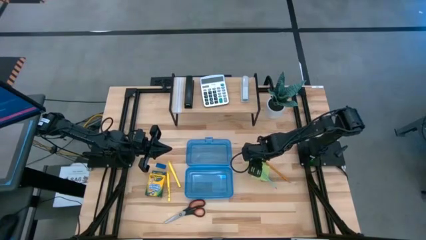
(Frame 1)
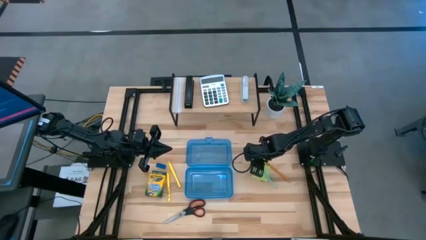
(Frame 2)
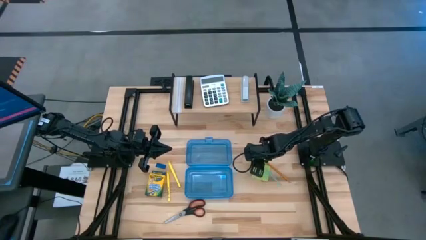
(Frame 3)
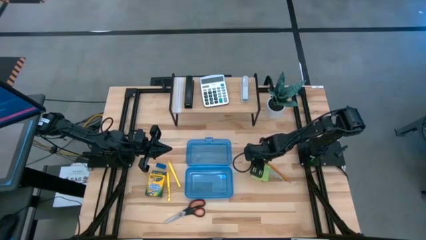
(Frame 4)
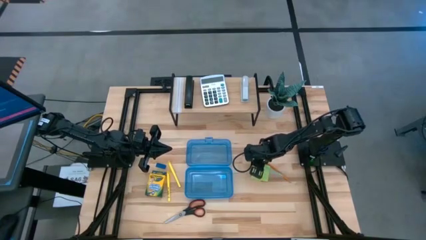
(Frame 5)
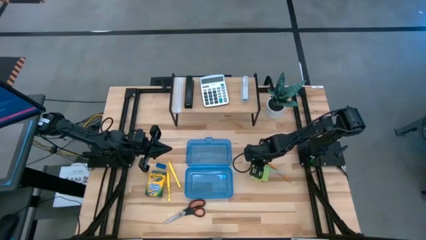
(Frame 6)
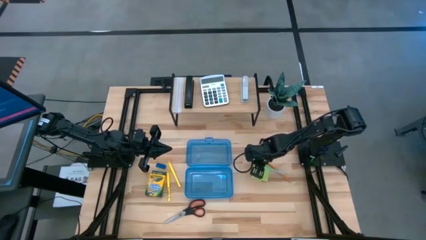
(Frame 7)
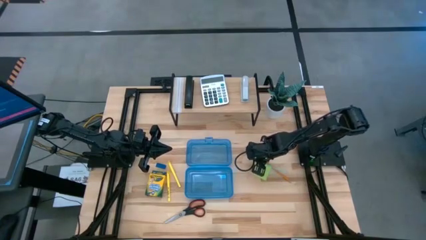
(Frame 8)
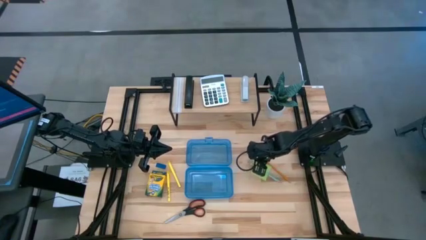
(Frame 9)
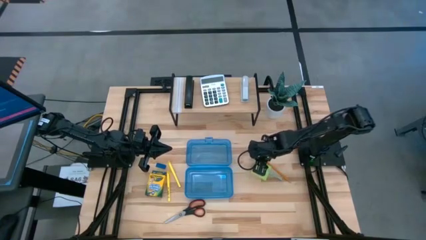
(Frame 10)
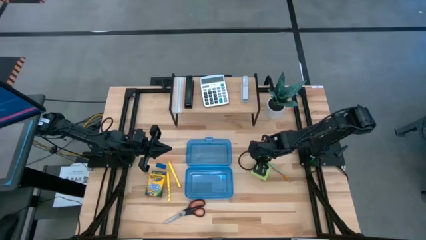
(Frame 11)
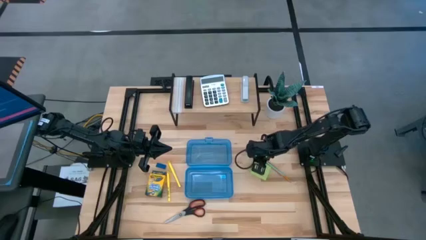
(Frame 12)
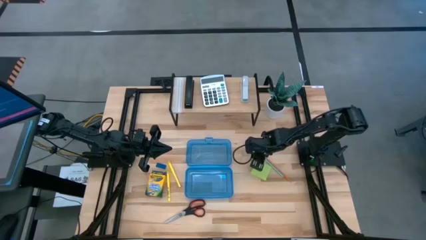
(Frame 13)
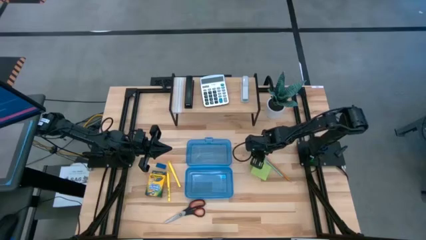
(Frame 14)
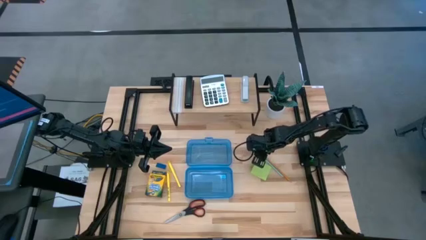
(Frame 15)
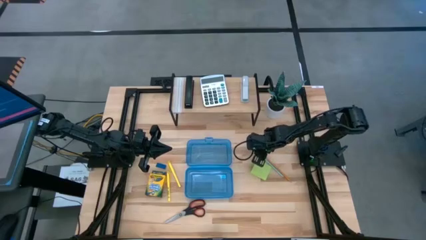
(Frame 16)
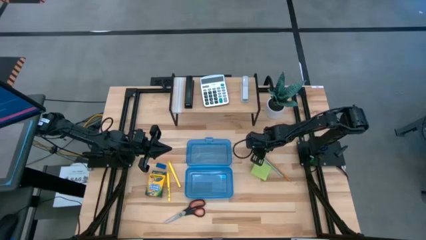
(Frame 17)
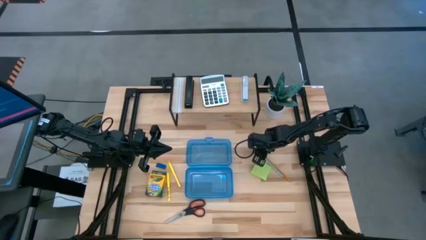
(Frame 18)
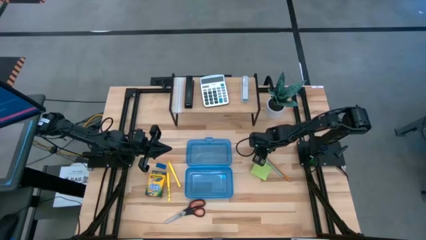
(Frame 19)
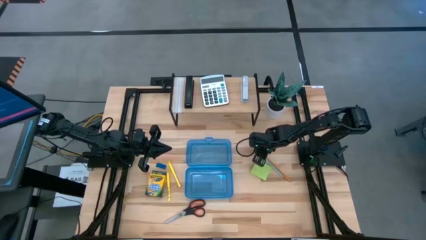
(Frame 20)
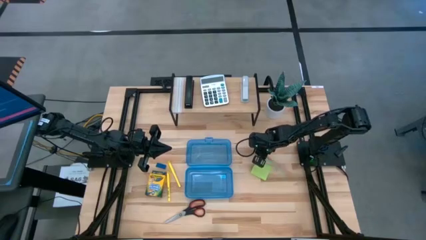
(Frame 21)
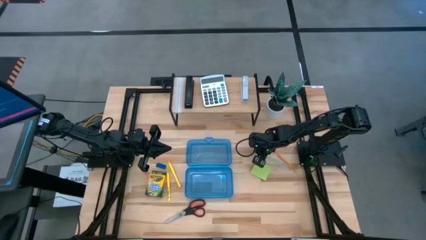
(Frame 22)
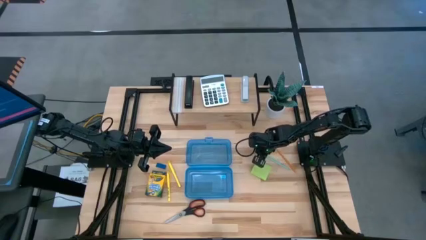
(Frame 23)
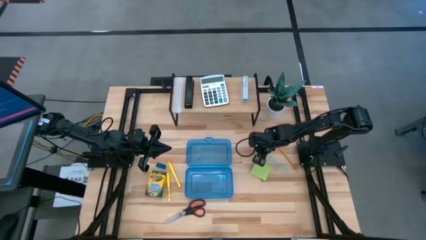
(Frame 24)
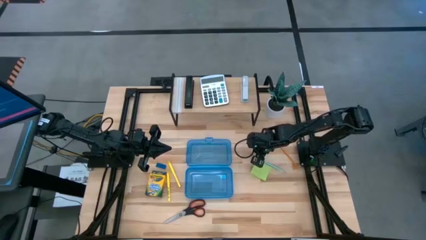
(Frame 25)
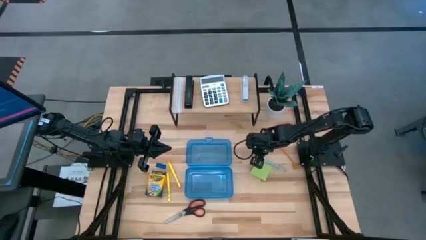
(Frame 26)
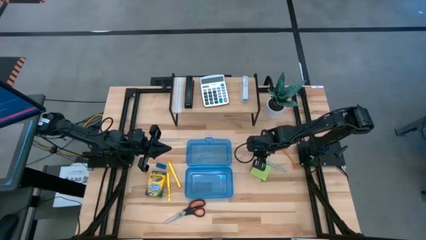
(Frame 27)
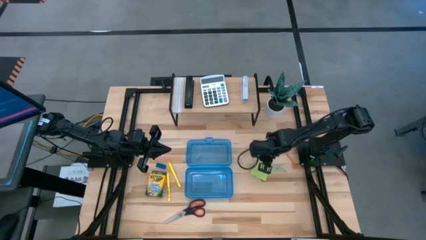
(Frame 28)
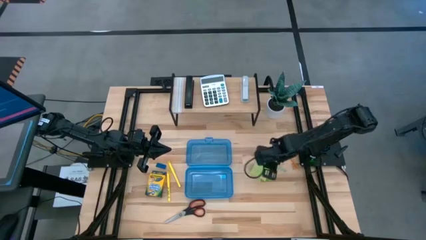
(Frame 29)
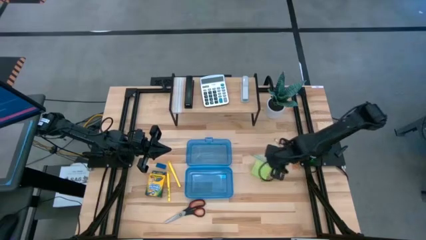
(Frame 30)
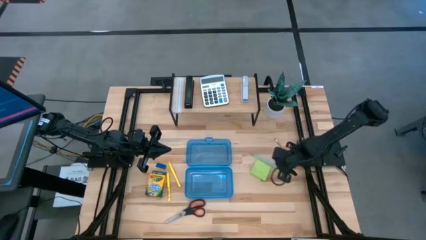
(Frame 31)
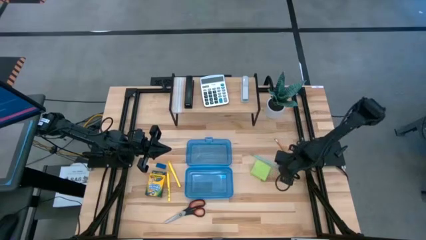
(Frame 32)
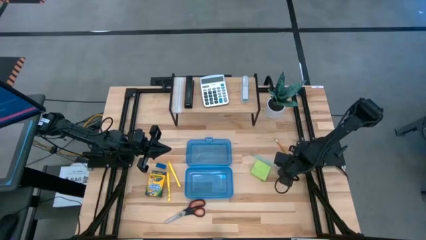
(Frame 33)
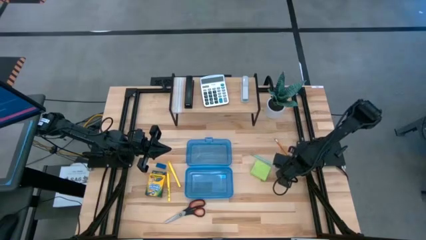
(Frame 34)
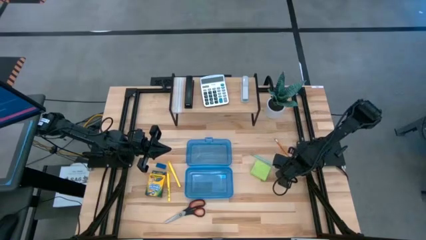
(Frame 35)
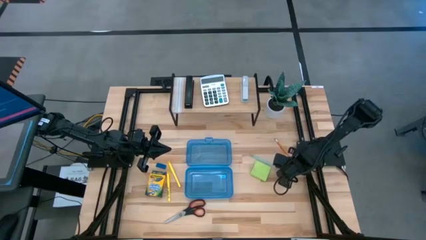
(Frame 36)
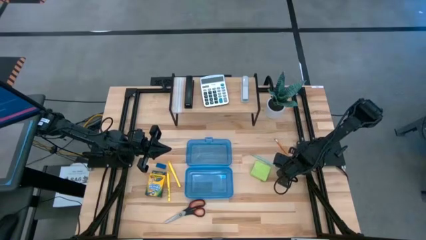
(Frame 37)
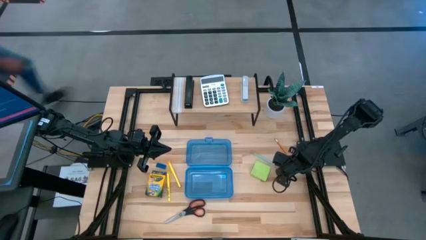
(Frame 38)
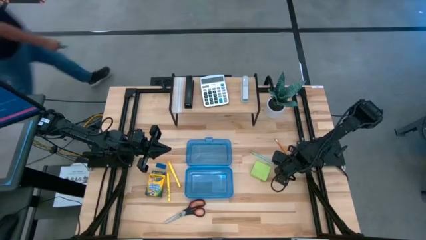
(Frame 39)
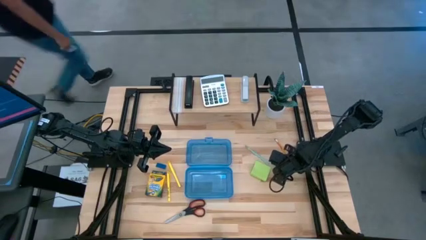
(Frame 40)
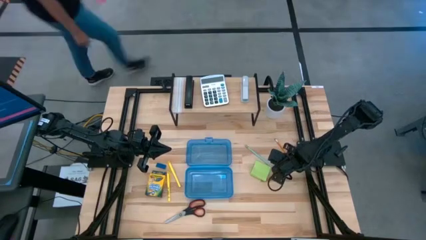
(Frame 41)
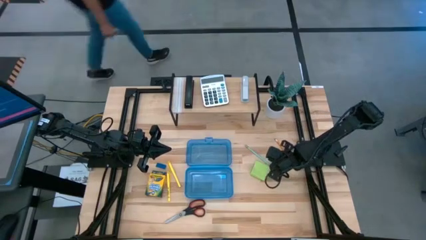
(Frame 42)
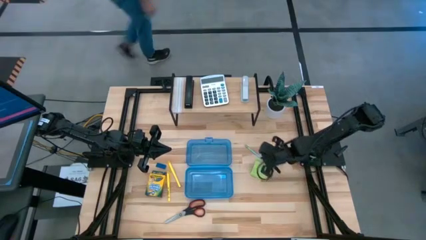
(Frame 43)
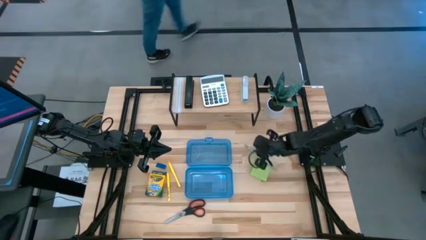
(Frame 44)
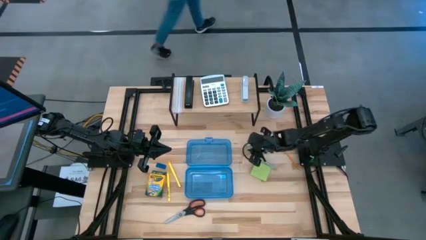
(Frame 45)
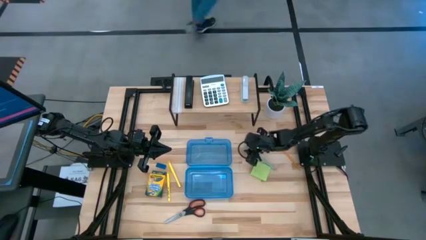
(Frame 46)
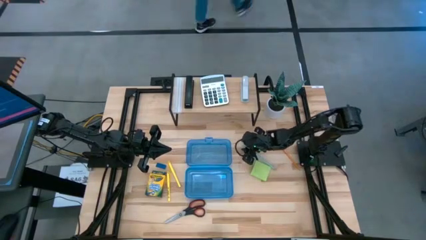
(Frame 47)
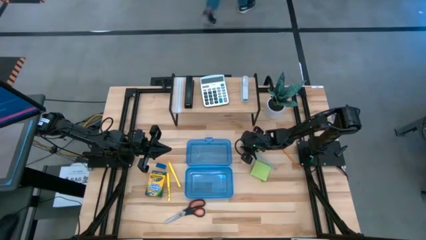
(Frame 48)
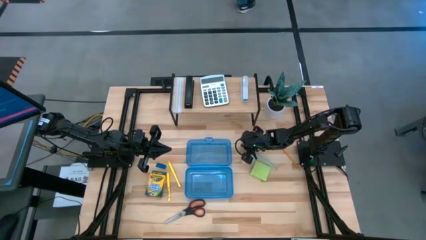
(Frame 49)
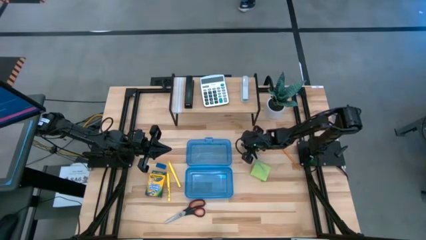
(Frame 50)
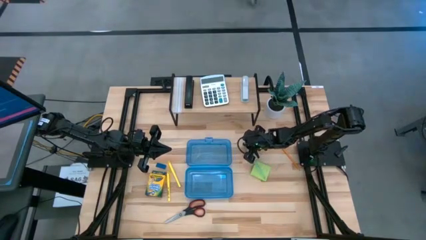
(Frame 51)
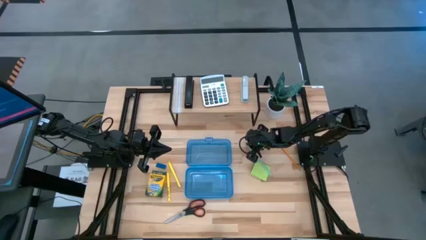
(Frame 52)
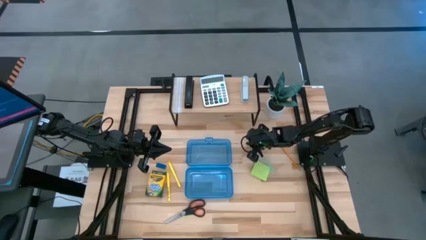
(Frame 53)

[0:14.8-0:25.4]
Task: Pack school essentials
Put the blue pencil into the blue supply box

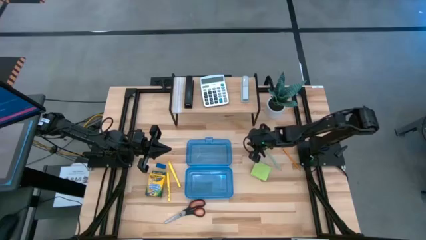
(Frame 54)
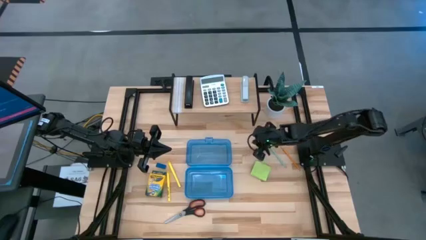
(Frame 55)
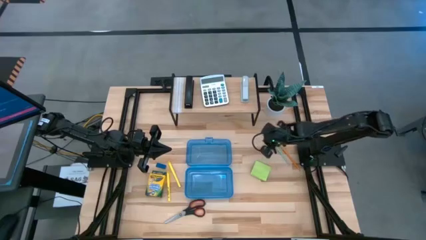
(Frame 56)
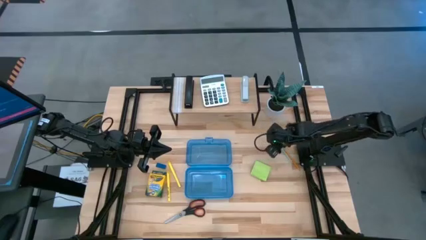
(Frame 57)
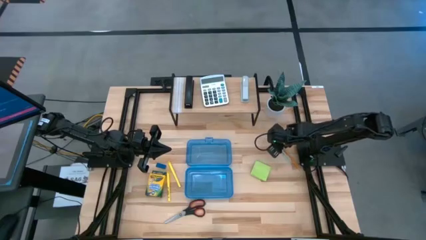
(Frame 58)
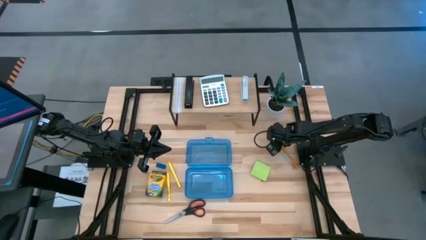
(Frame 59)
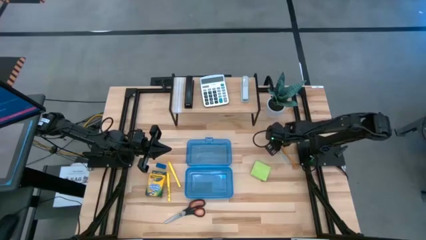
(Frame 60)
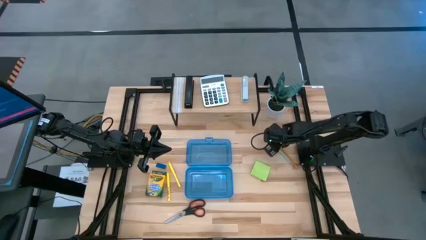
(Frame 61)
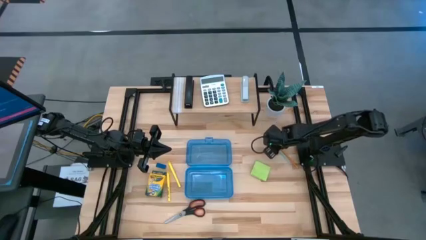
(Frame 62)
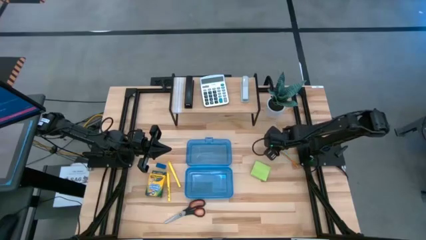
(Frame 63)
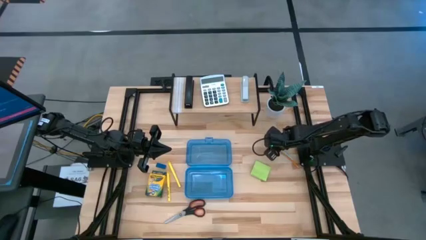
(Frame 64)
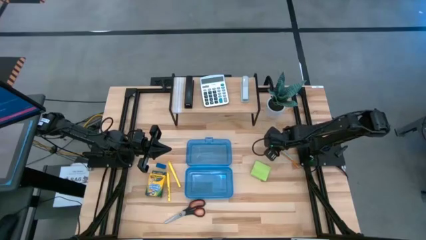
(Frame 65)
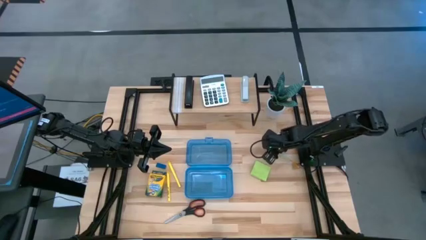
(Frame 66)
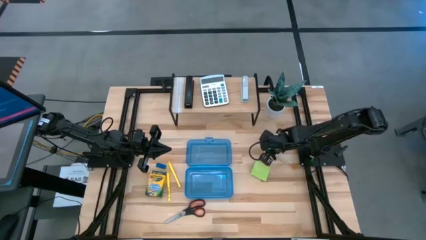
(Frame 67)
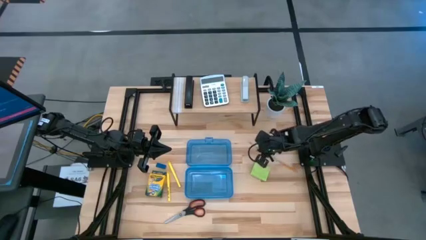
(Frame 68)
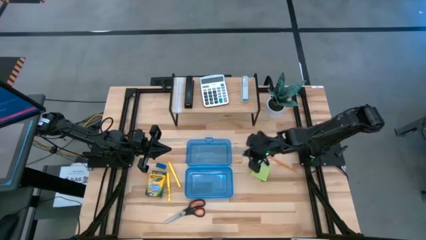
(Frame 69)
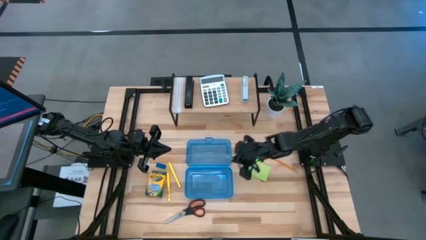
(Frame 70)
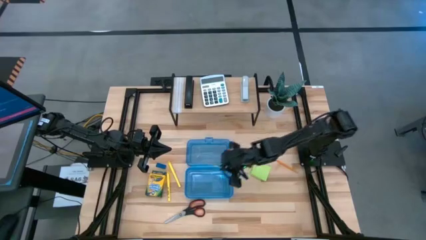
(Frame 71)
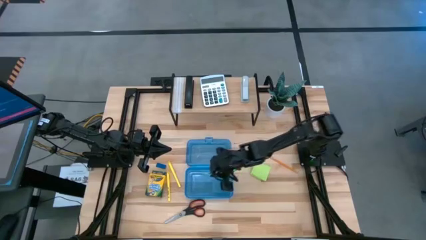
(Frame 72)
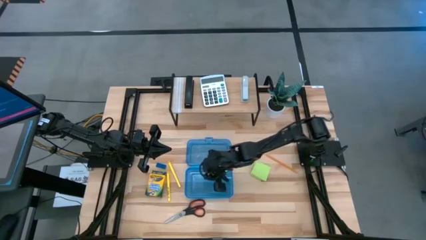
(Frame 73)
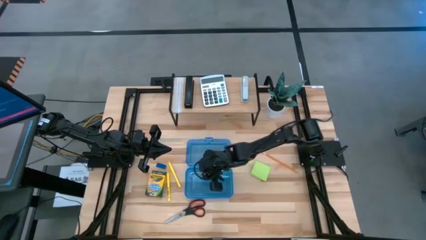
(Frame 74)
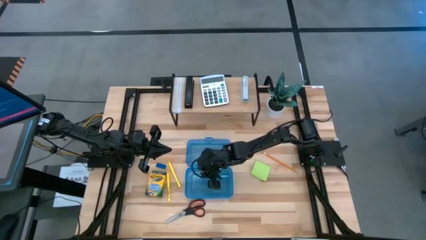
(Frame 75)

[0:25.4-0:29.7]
Put the blue pencil into the blue supply box

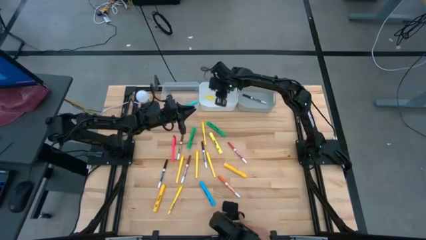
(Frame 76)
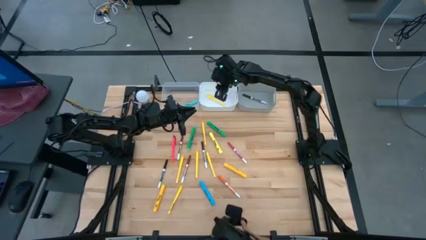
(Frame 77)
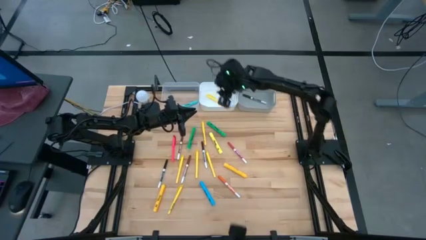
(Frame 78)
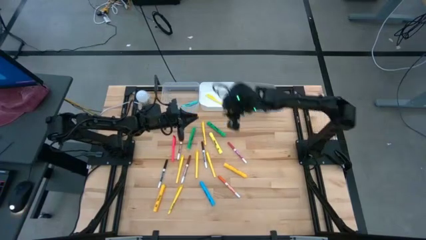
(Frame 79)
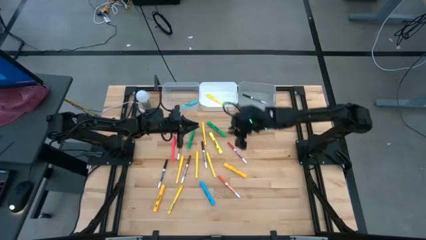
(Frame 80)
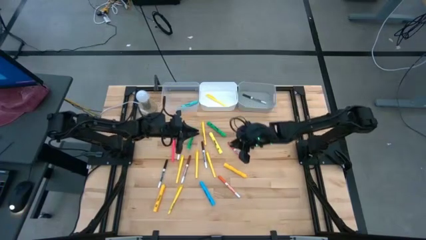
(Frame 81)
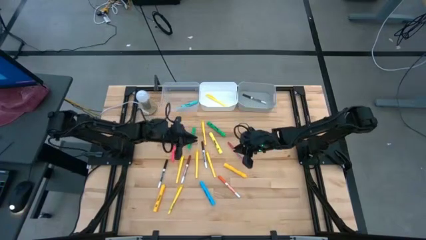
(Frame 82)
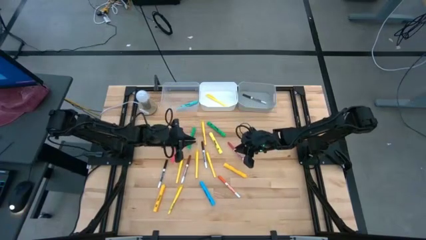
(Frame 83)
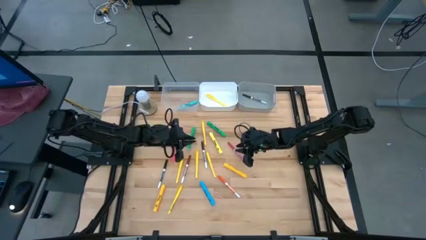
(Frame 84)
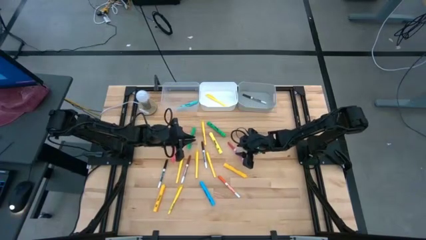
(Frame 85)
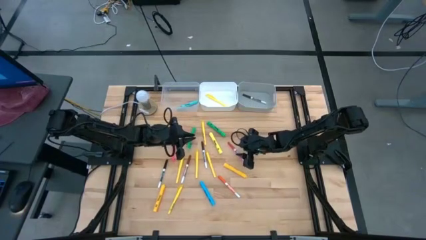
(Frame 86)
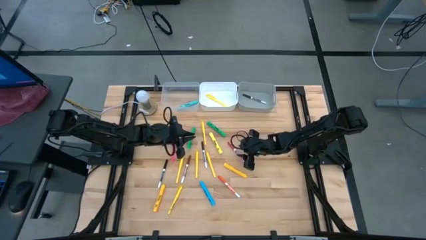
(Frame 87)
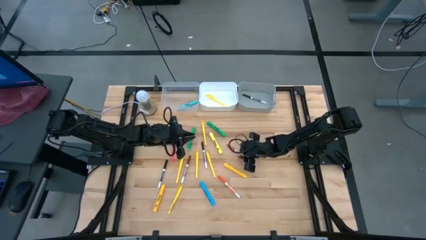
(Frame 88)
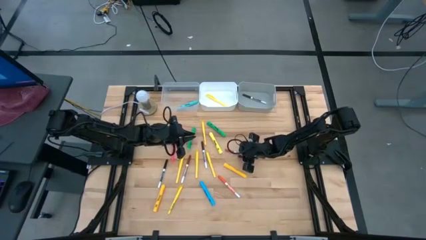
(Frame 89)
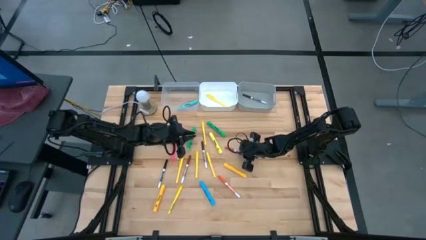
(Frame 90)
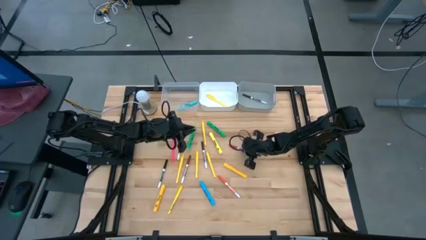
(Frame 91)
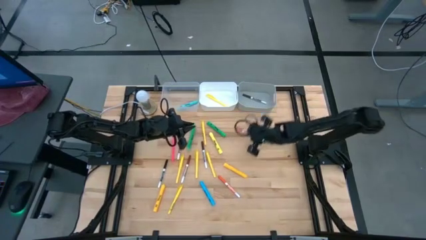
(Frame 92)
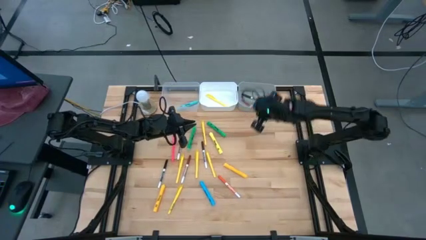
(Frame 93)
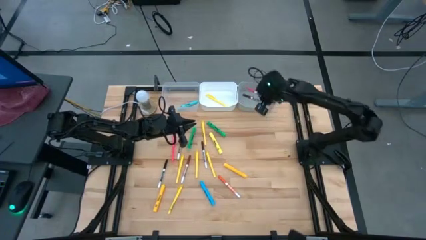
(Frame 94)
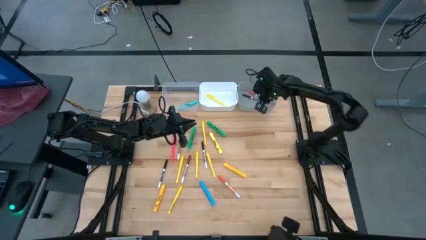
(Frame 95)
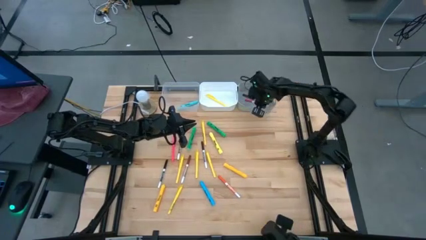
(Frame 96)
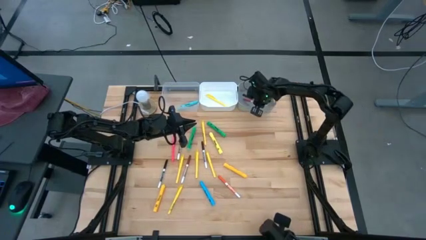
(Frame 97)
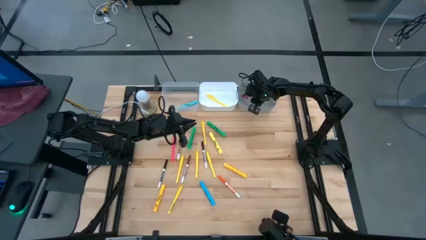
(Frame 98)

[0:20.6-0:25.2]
Task: Pick & Place Markers
Put the red marker pen into the gray bin
